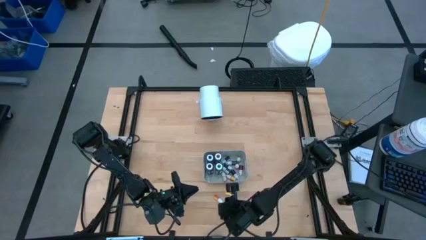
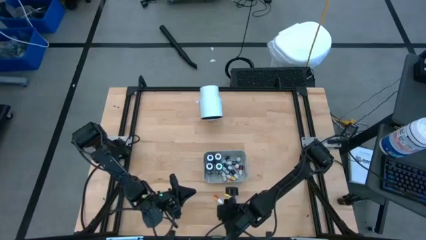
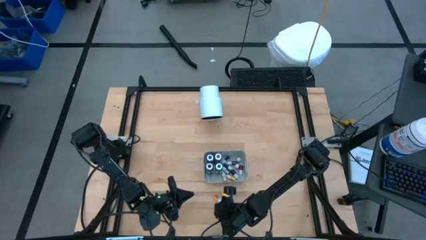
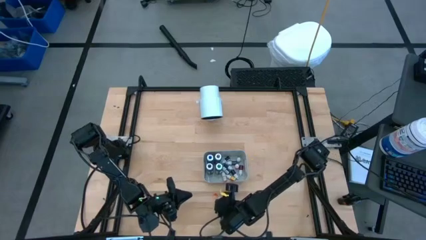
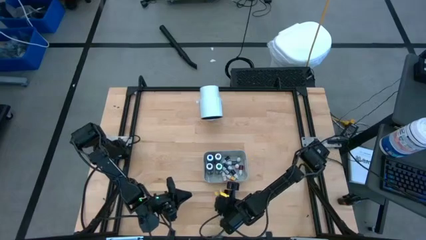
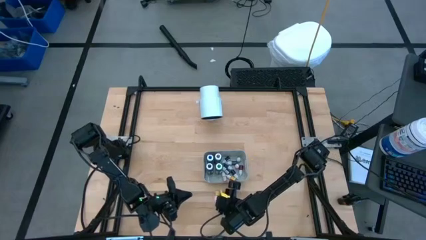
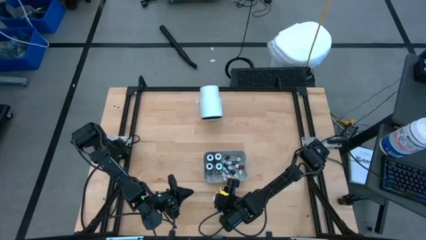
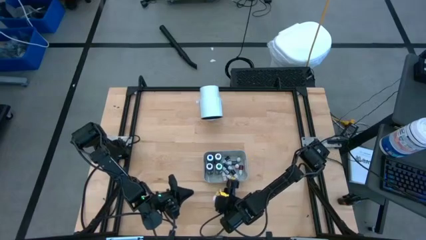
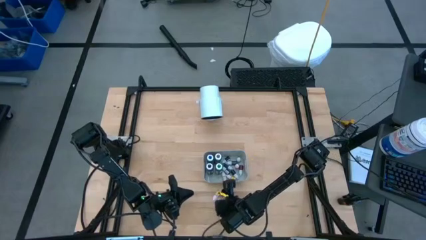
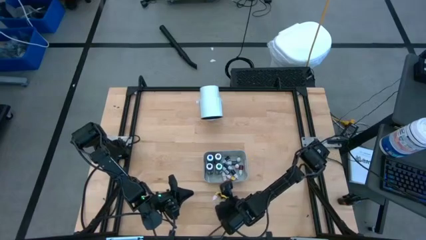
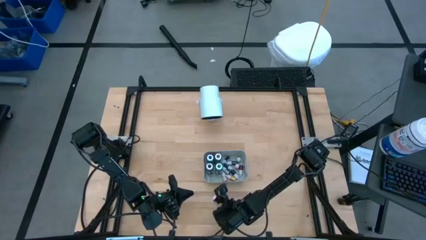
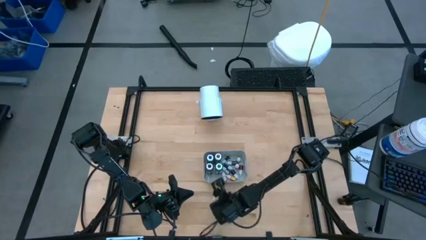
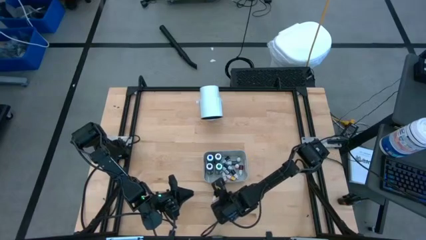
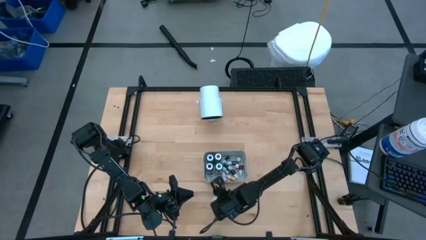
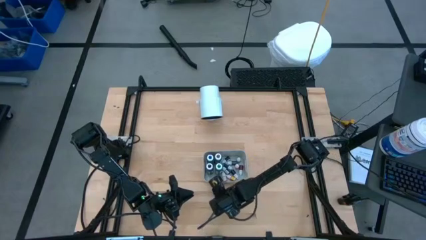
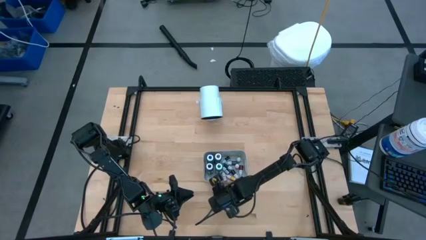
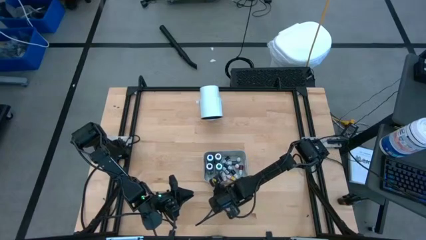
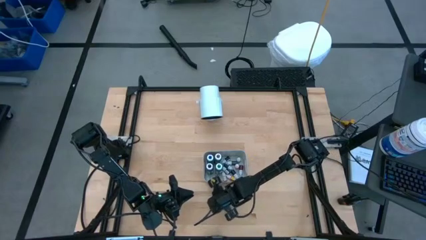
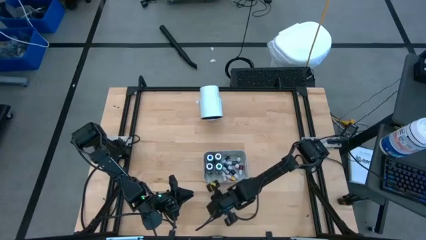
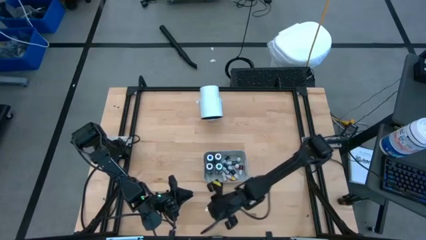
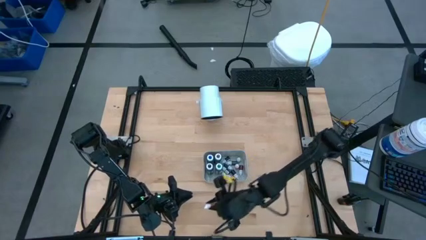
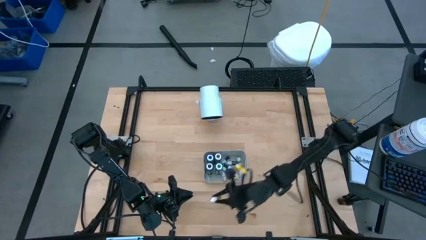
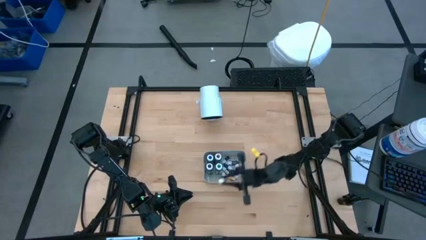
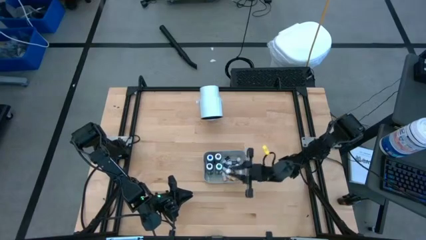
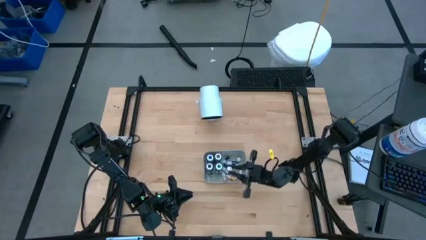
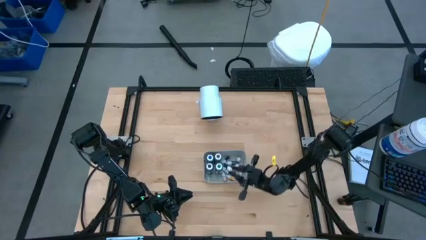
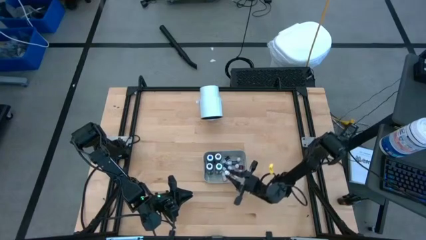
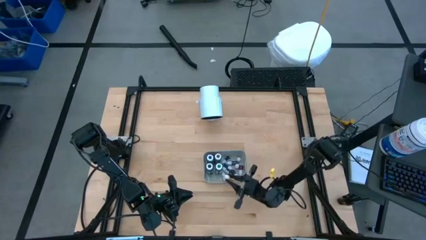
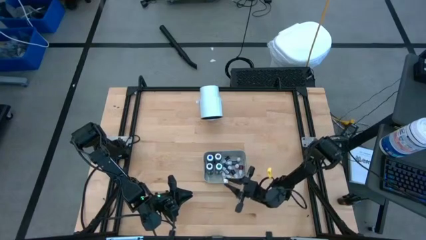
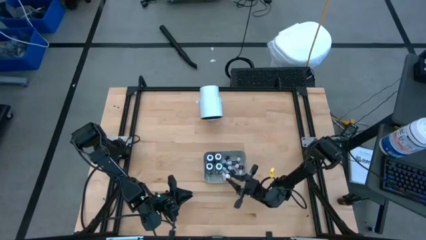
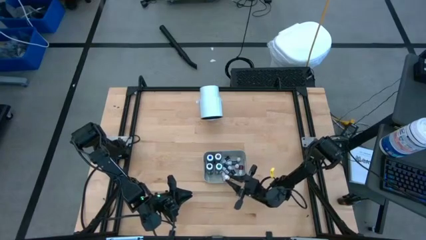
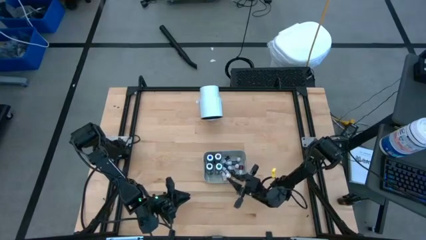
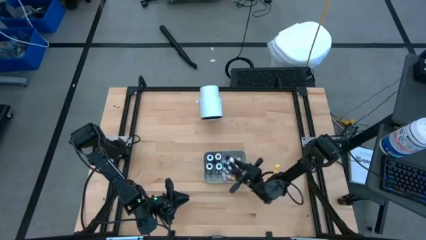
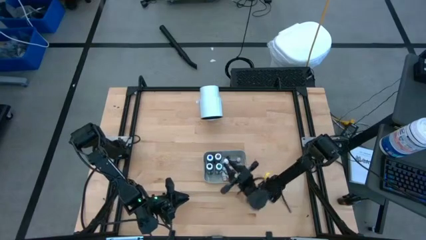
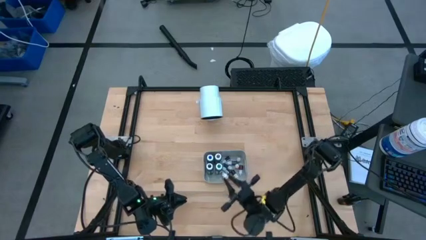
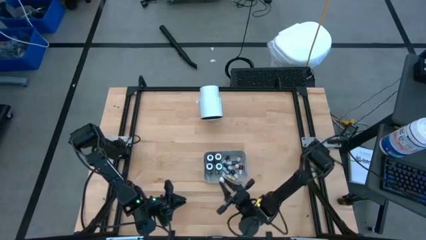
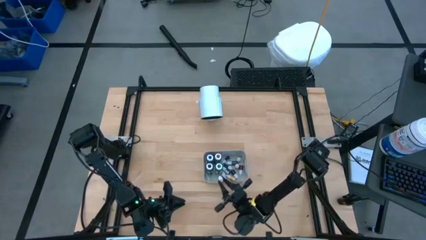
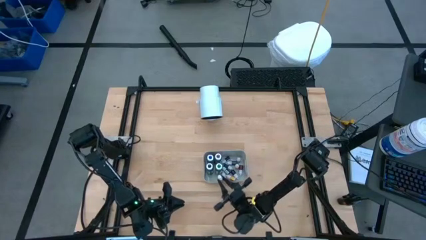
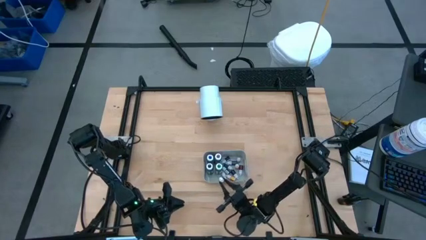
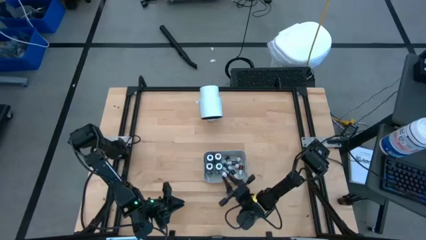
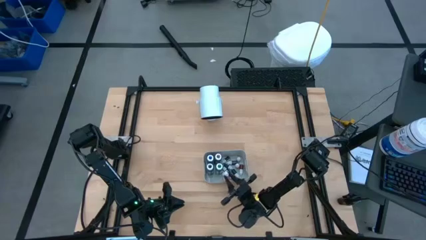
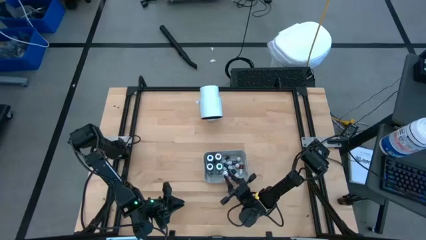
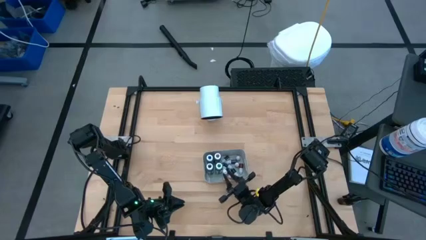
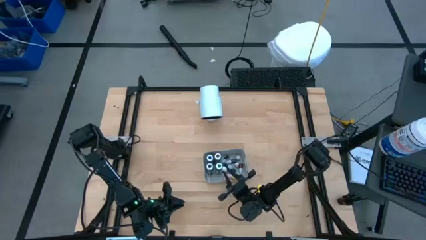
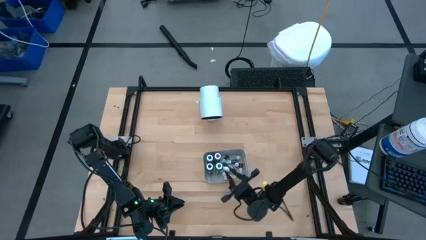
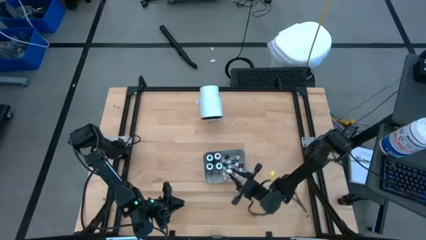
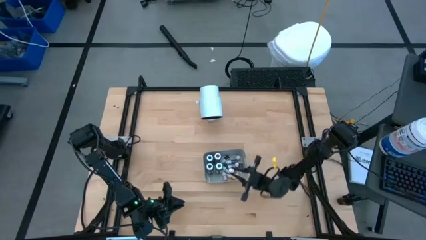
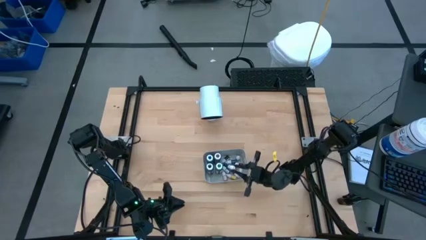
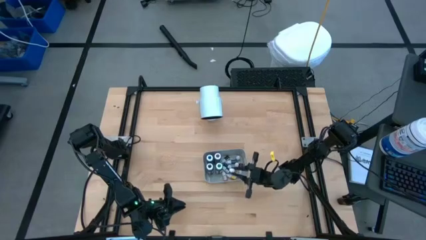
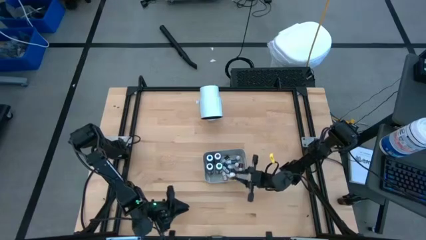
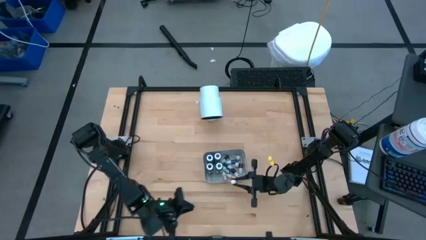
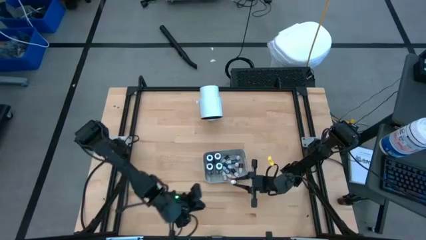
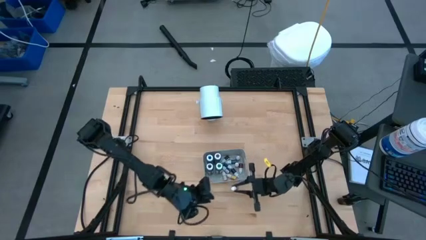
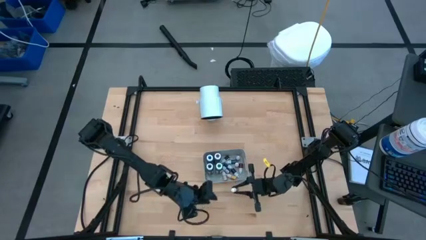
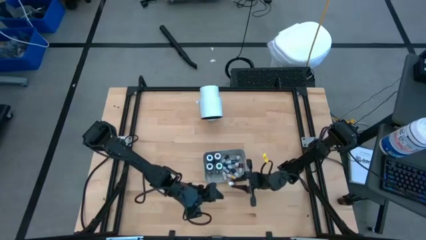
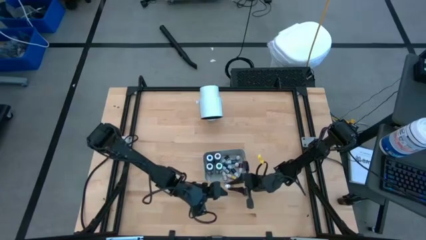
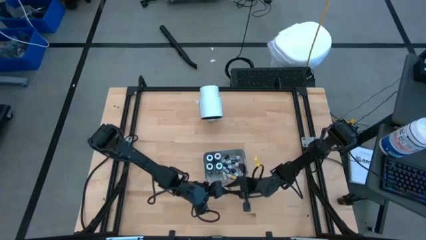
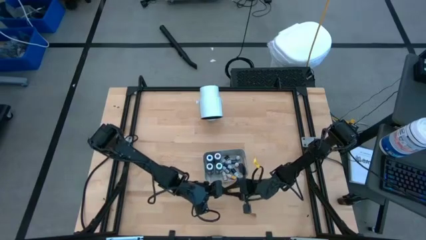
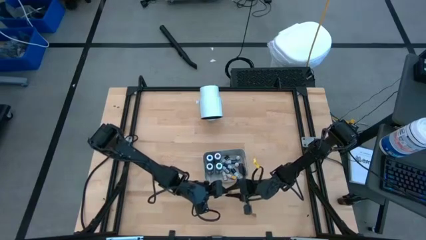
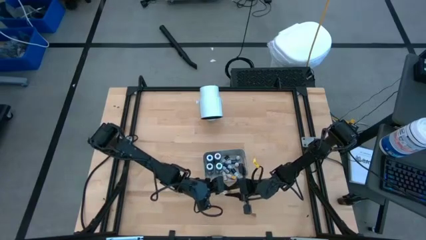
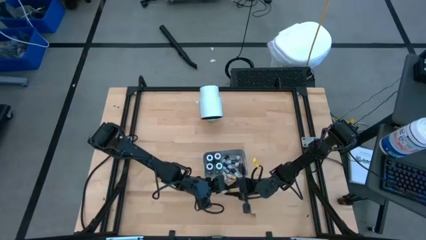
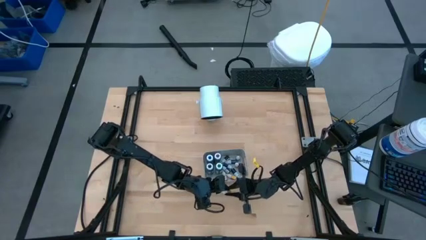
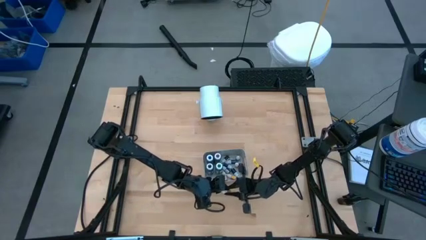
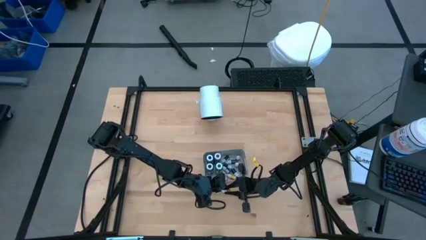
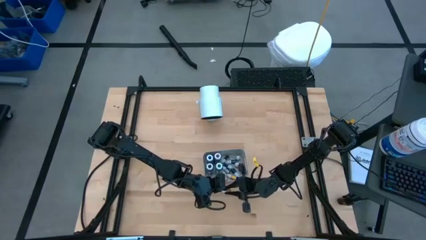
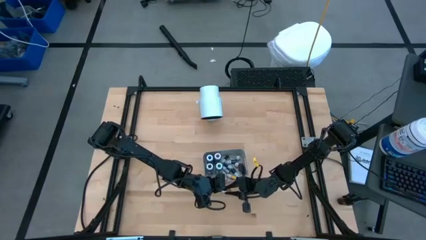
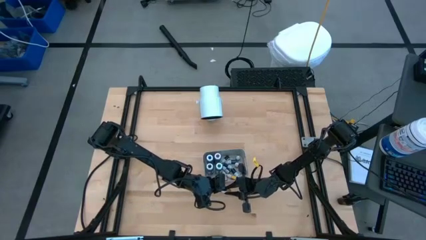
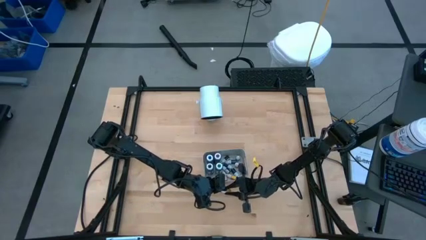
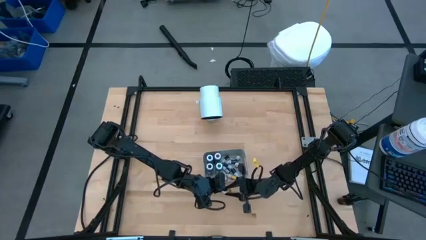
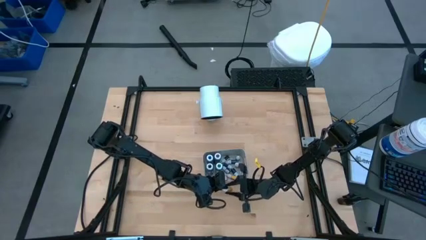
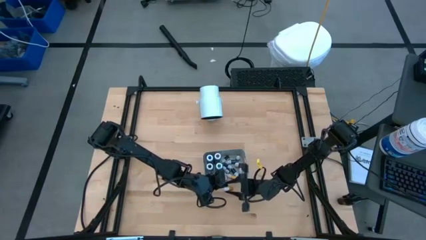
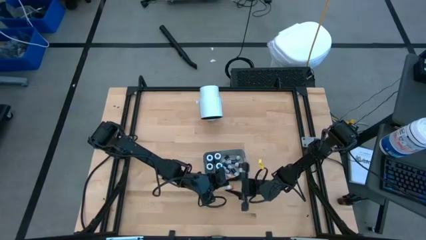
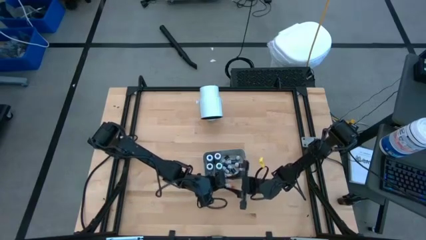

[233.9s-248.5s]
Task: Pick & Place food coloring
Put the orange food coloring bottle into the gray bin
